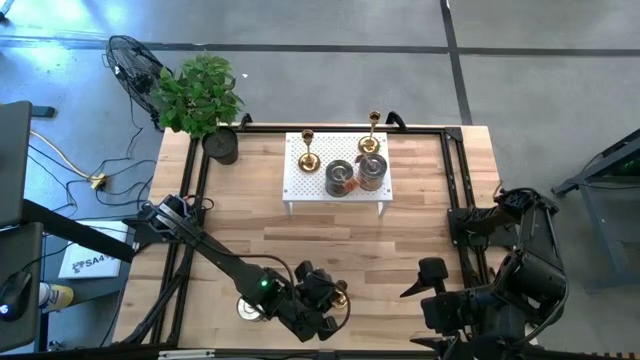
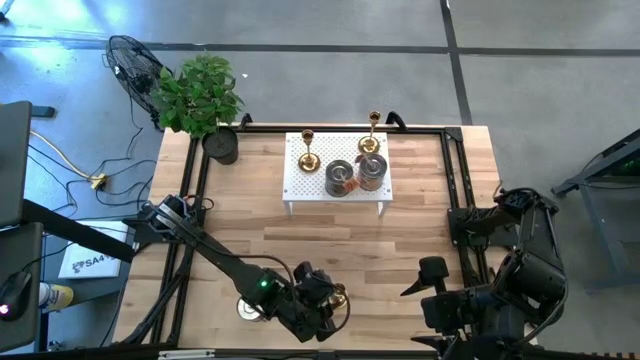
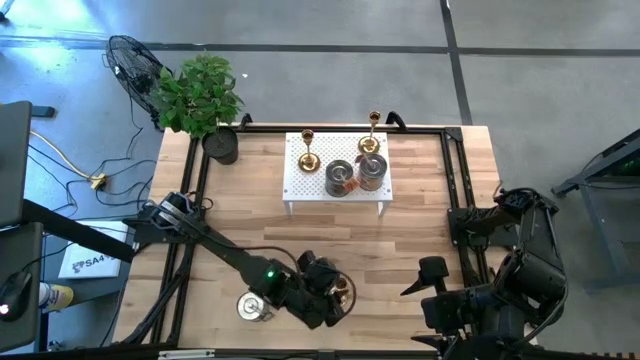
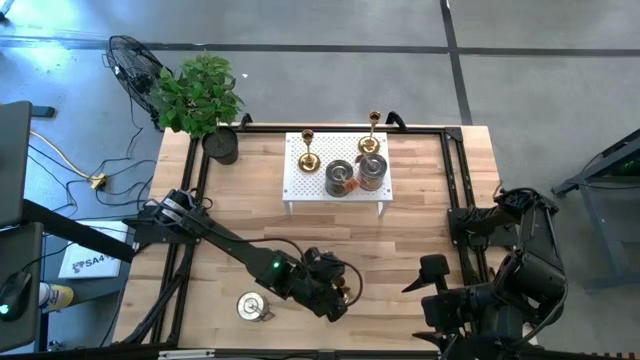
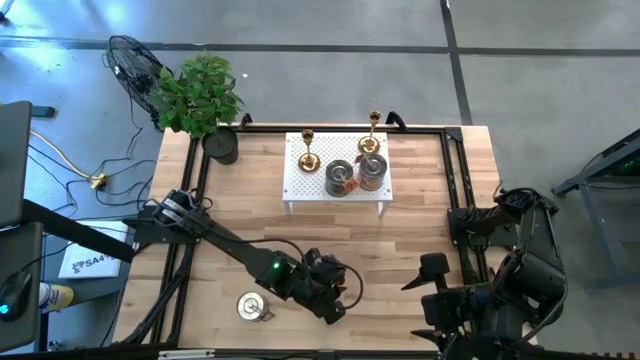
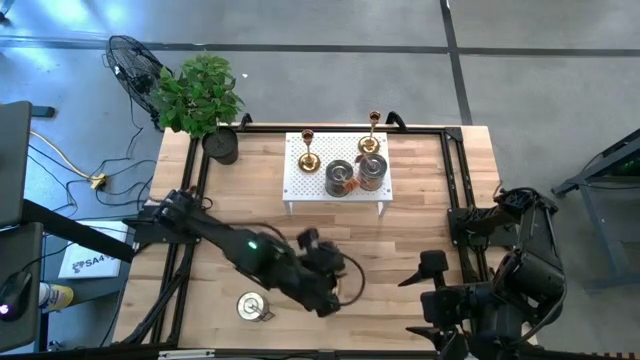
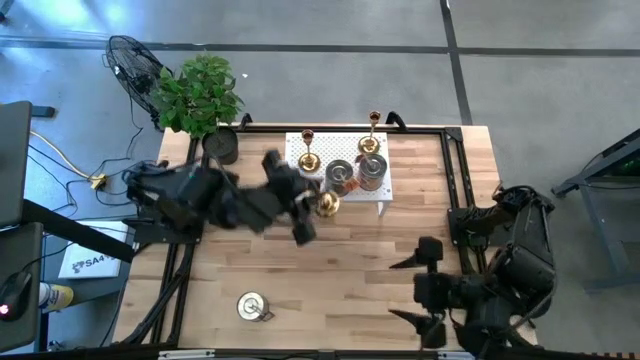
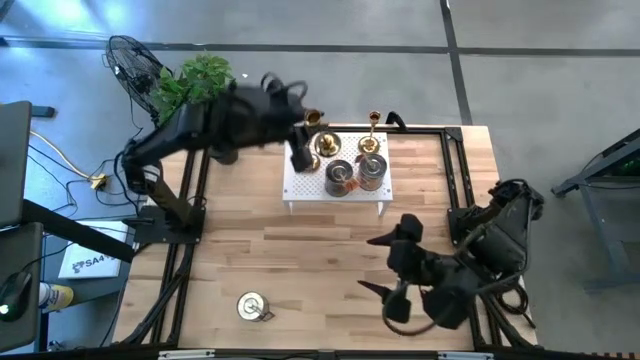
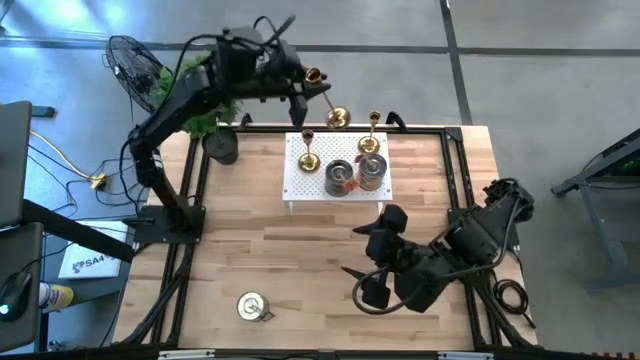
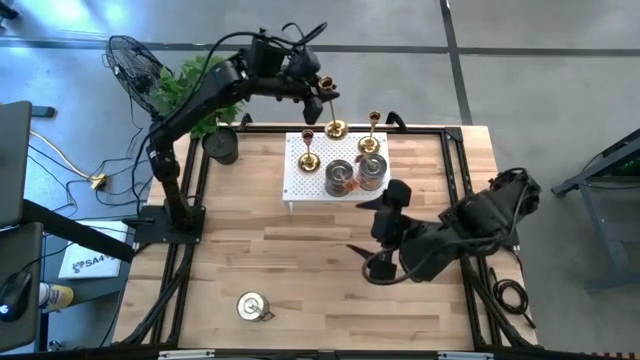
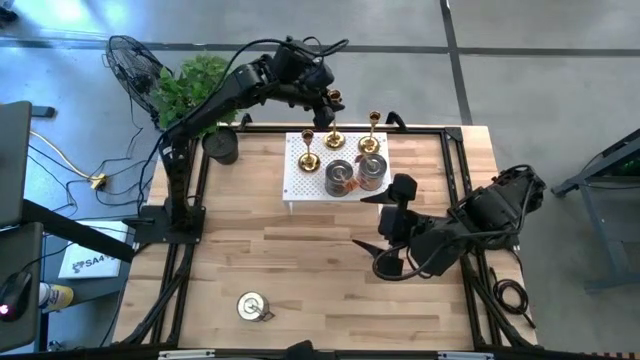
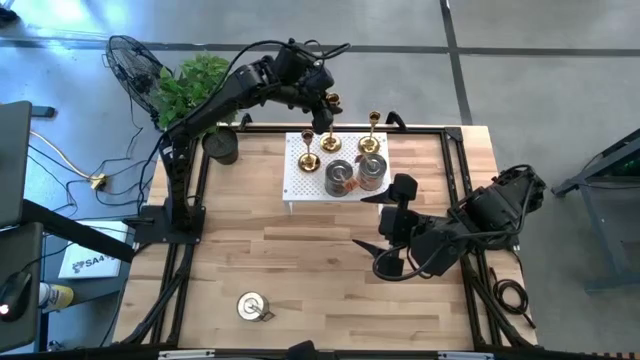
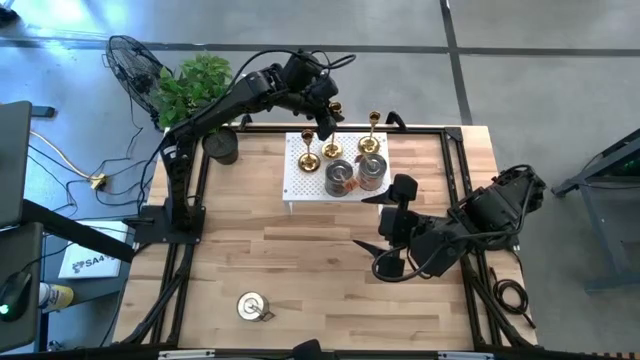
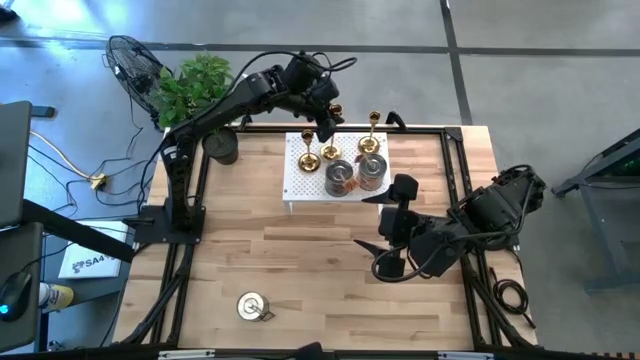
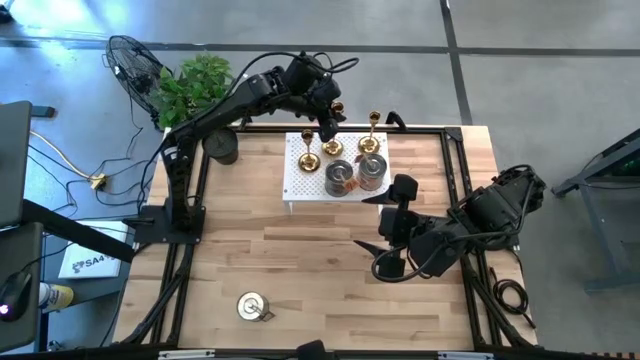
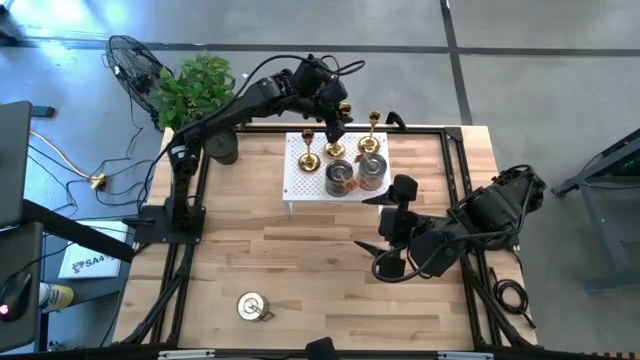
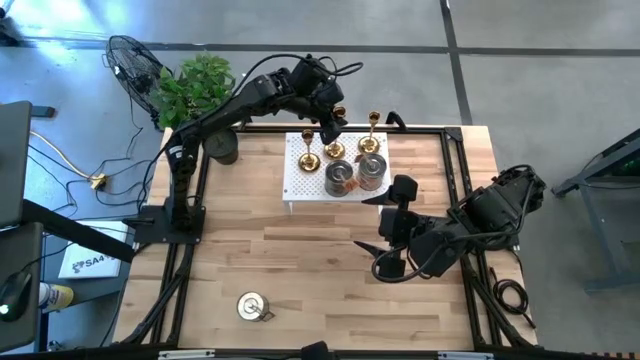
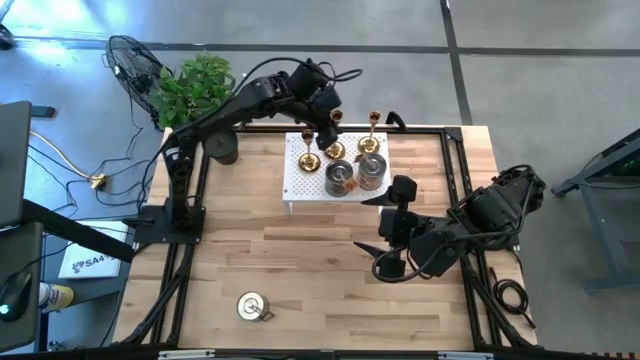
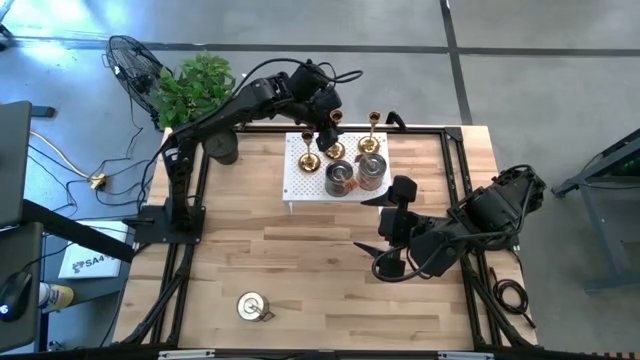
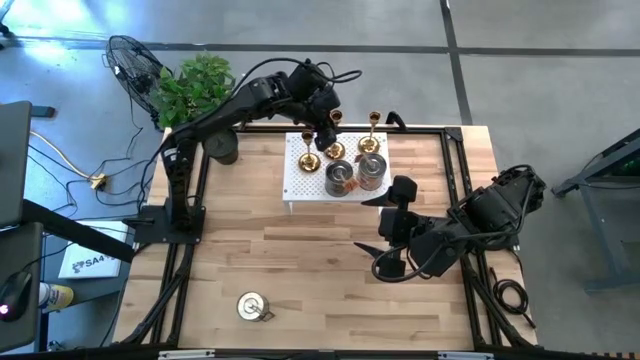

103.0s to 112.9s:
Task: Pick & Place candle stick holders
Align the gold candle holder with the other gold candle holder on the shelf

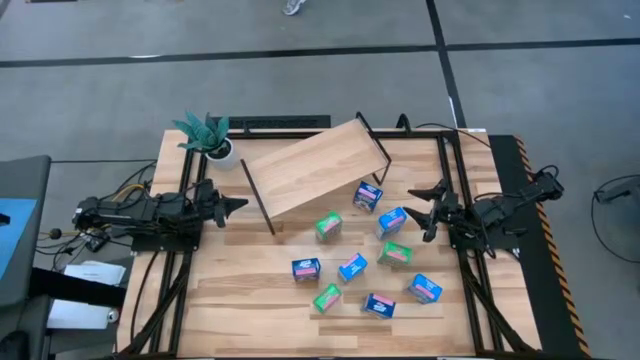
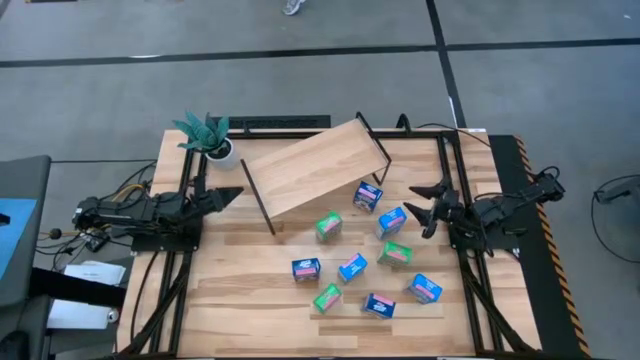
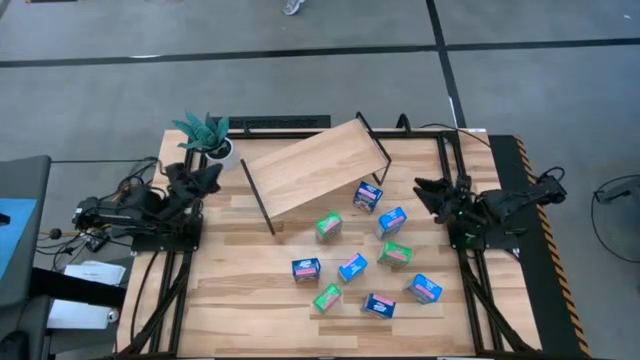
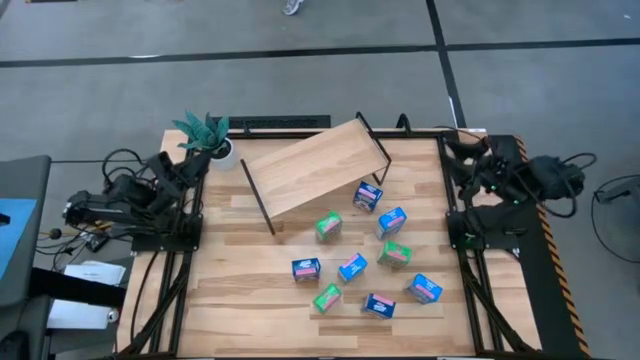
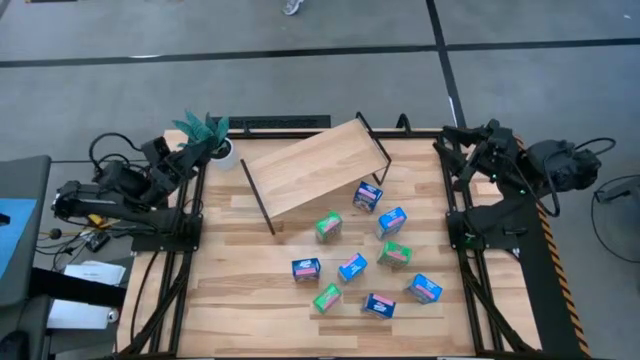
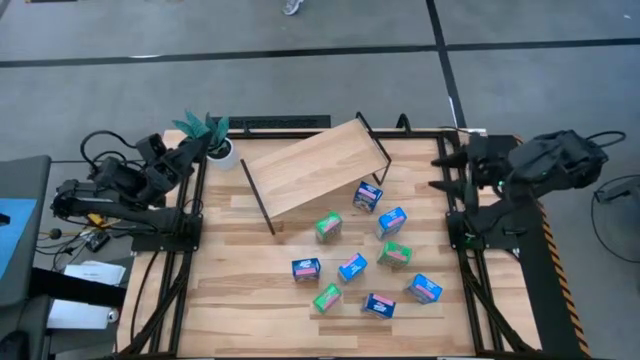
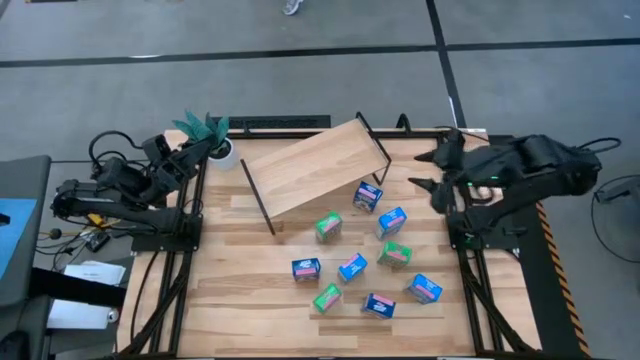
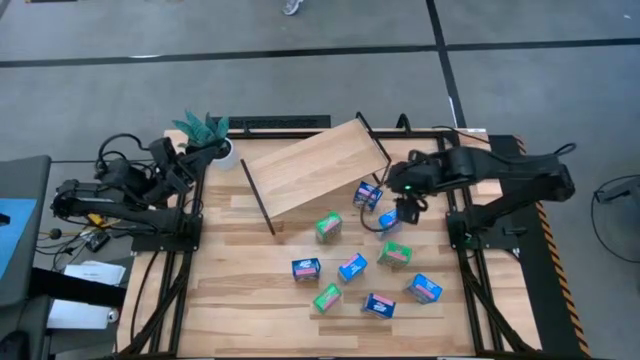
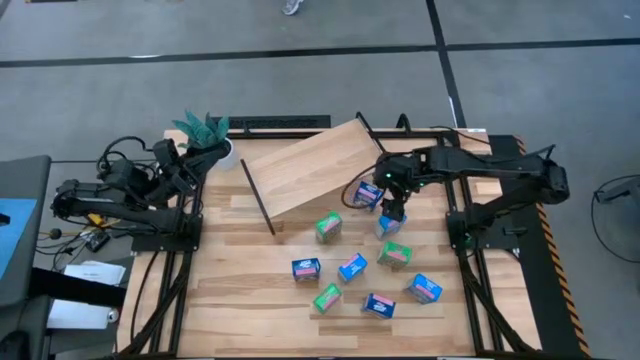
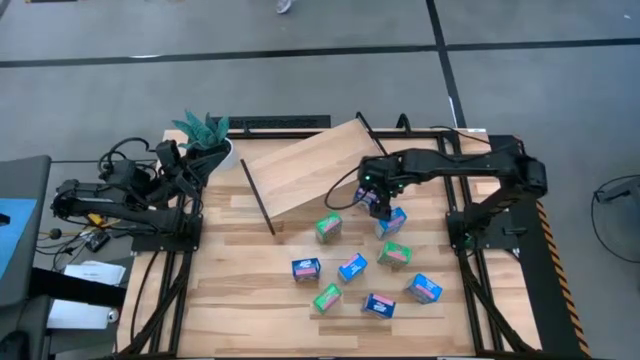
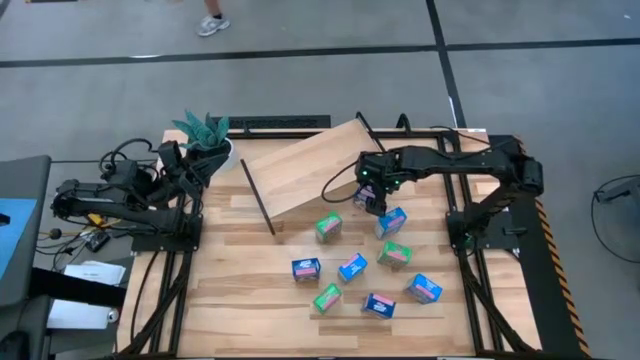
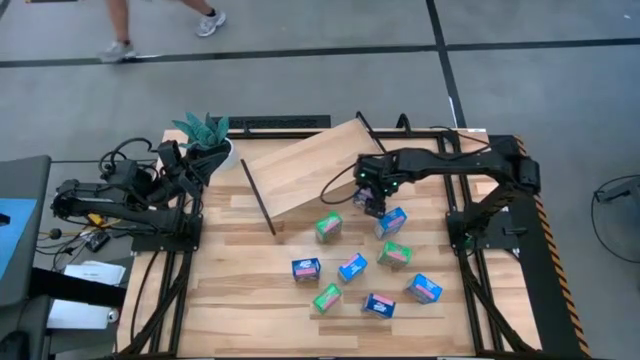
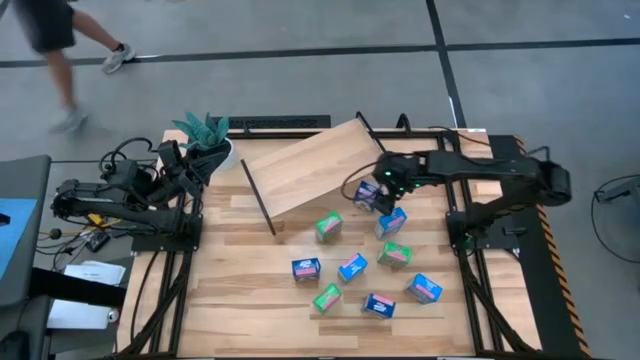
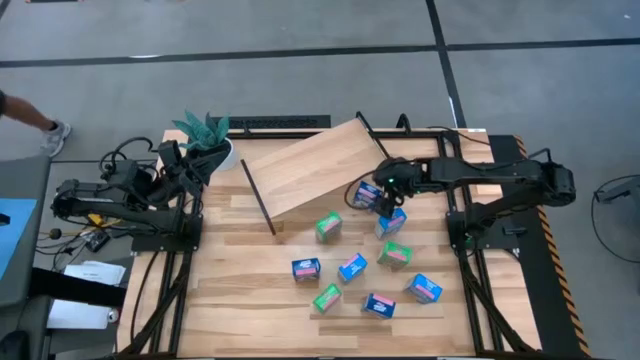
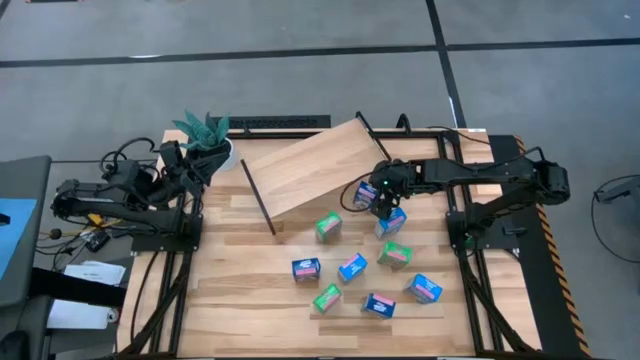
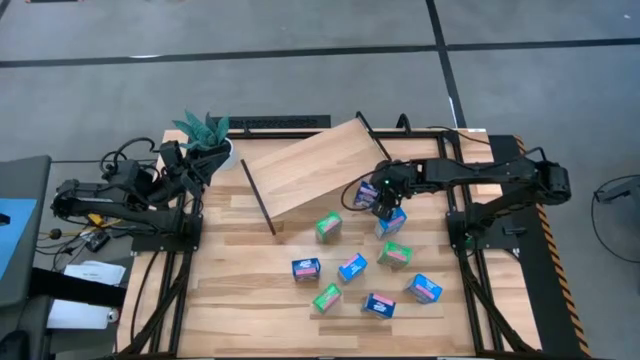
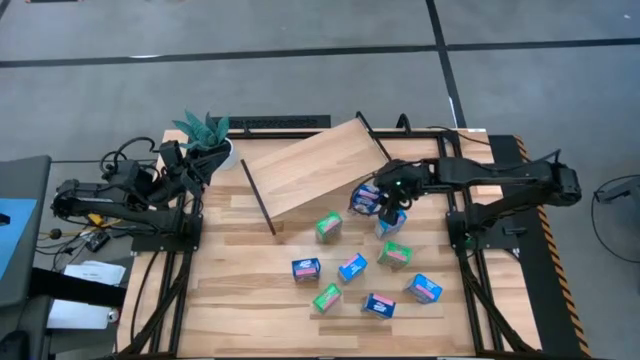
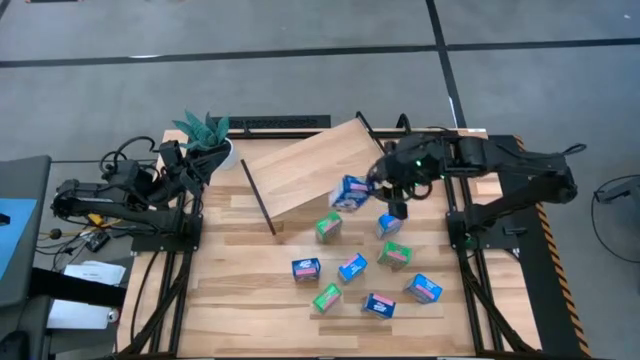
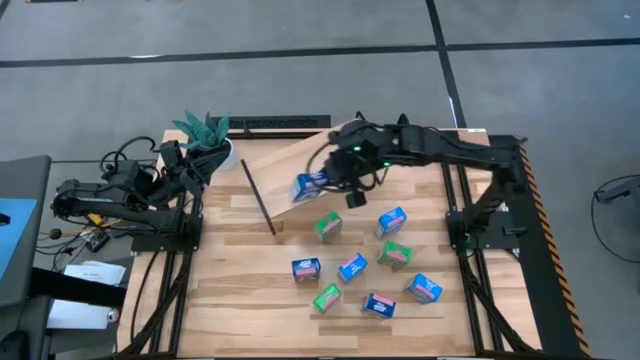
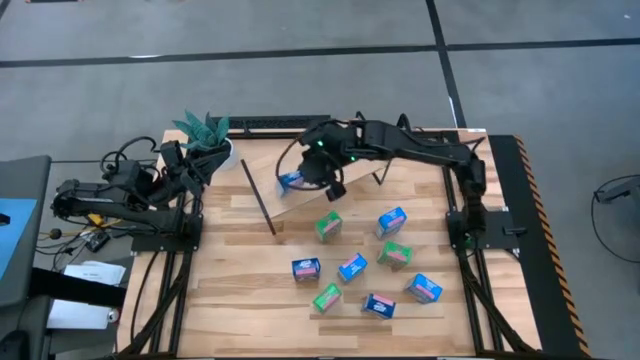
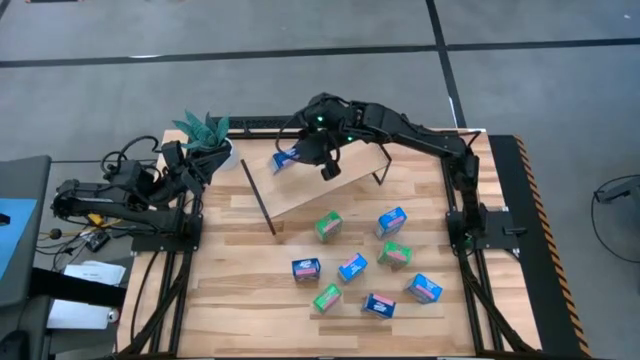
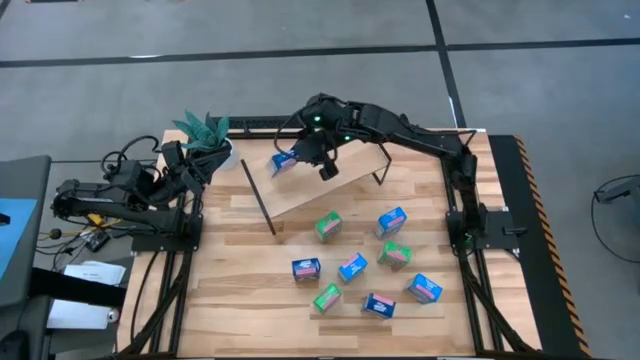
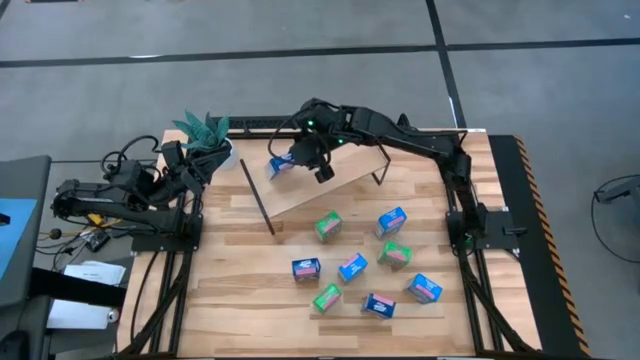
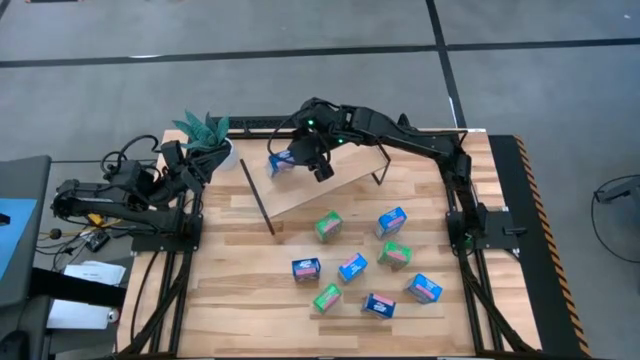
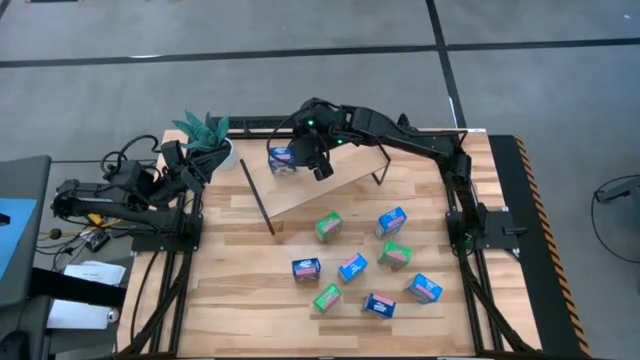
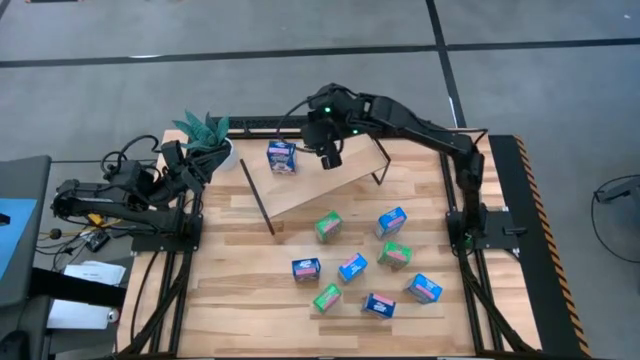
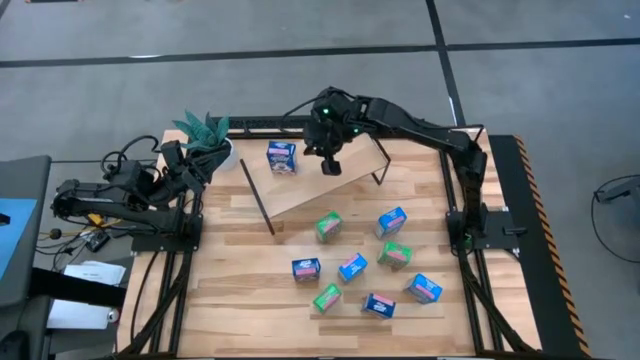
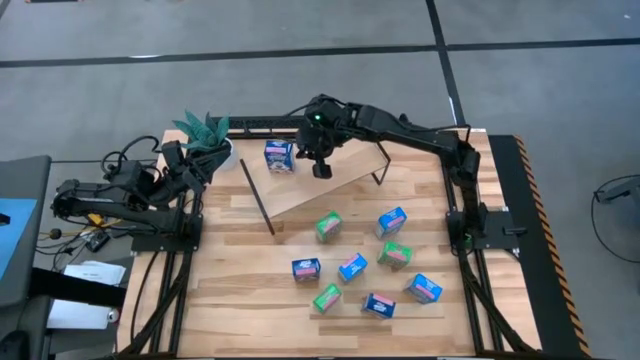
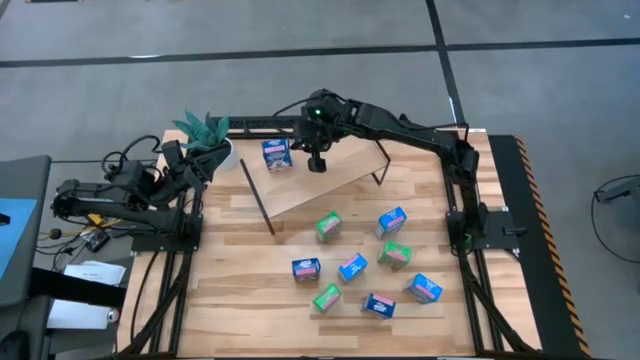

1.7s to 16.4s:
Task: Stack cereal on shelf
Put the top blue cereal box on the shelf
